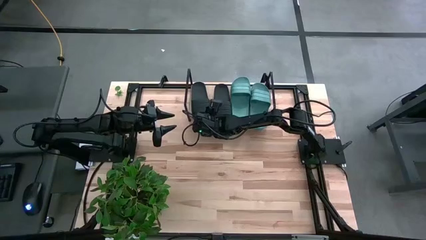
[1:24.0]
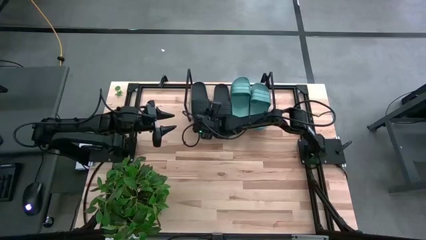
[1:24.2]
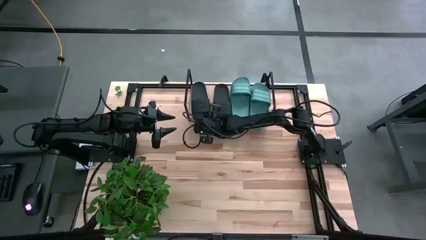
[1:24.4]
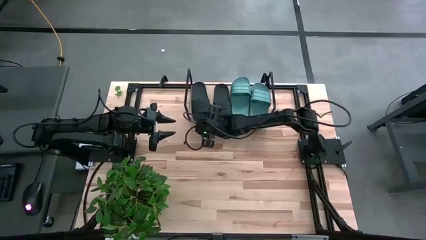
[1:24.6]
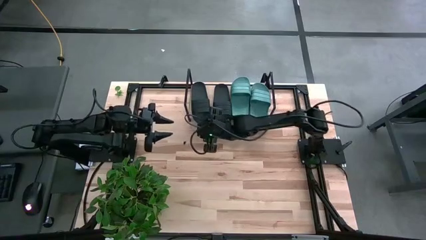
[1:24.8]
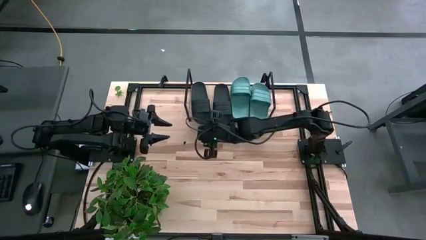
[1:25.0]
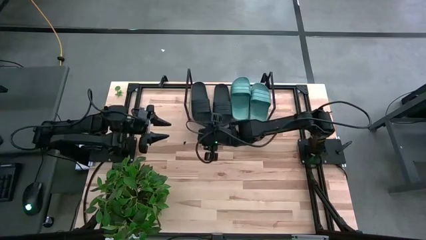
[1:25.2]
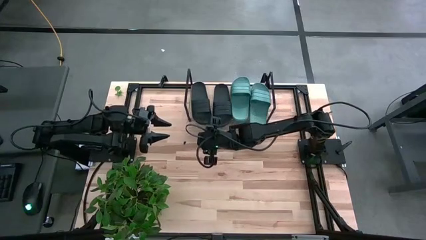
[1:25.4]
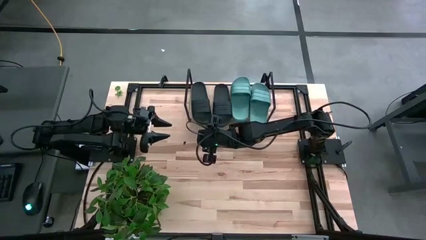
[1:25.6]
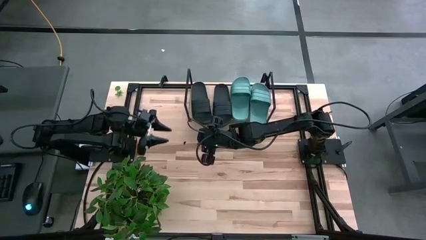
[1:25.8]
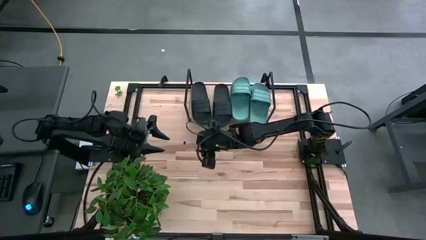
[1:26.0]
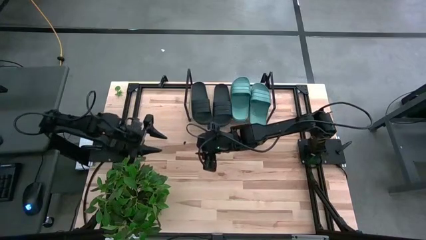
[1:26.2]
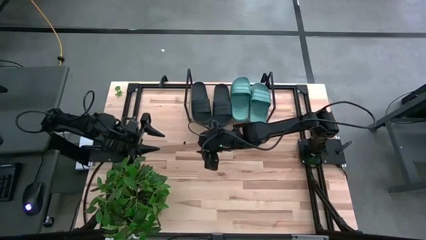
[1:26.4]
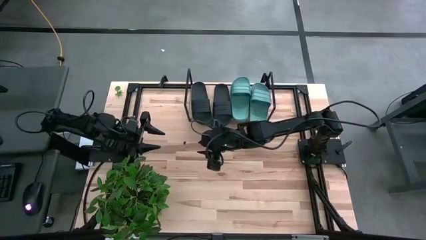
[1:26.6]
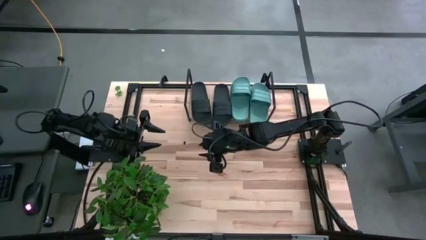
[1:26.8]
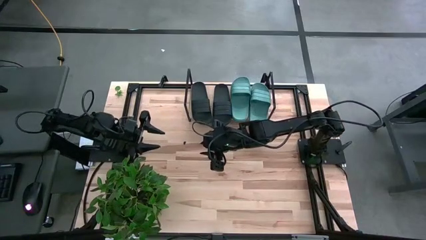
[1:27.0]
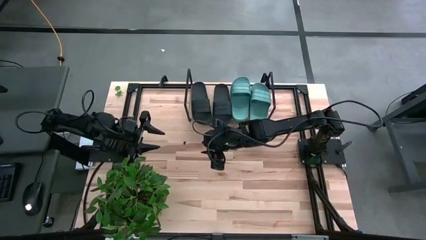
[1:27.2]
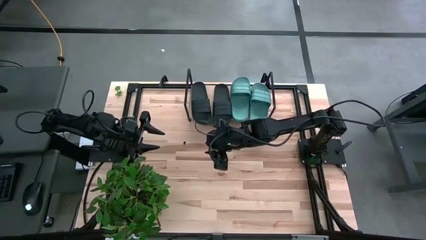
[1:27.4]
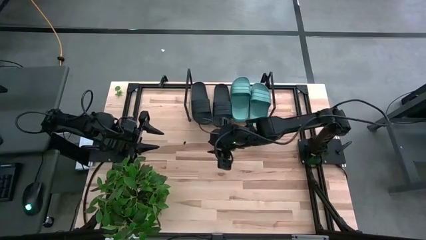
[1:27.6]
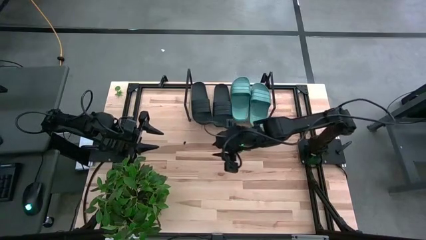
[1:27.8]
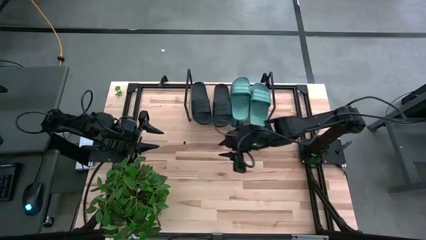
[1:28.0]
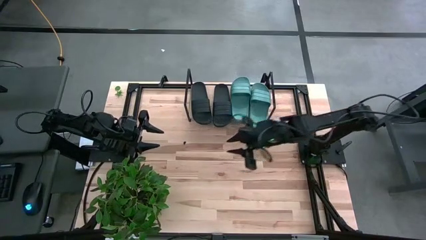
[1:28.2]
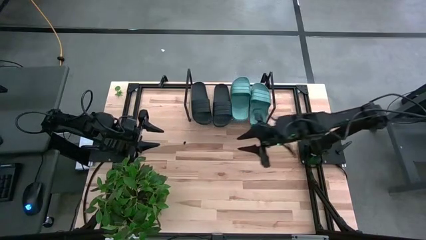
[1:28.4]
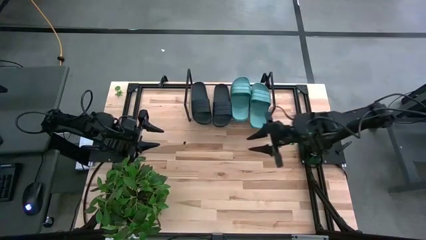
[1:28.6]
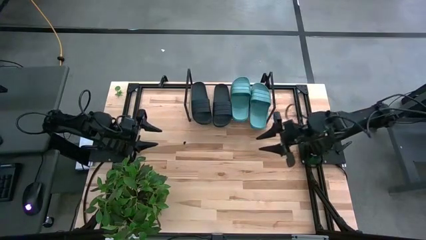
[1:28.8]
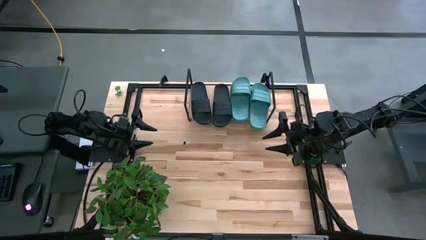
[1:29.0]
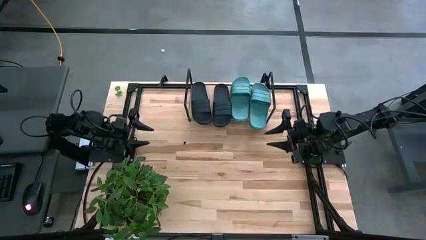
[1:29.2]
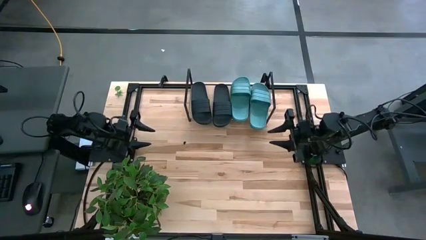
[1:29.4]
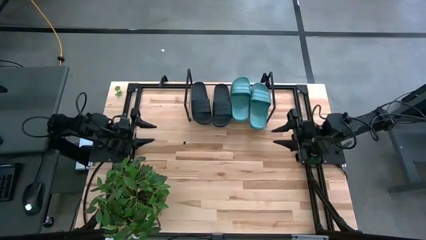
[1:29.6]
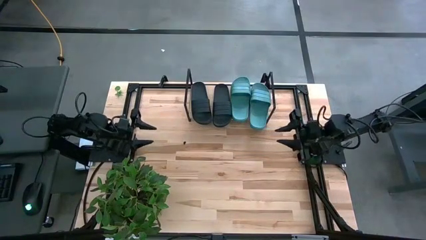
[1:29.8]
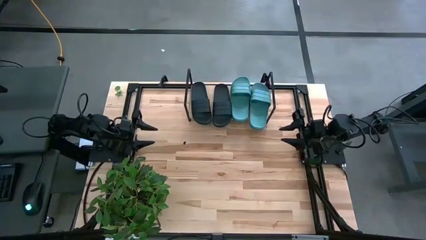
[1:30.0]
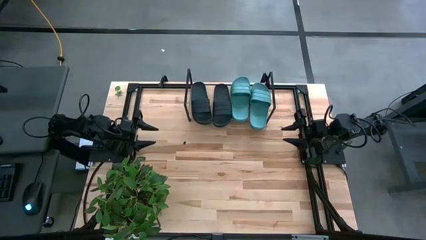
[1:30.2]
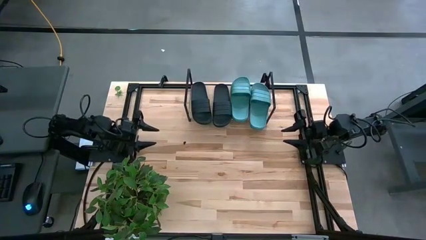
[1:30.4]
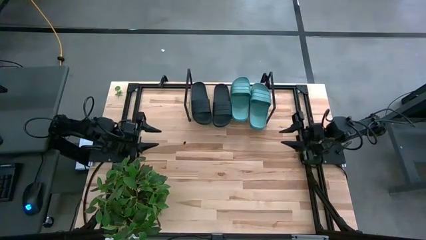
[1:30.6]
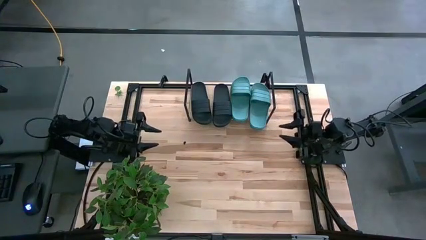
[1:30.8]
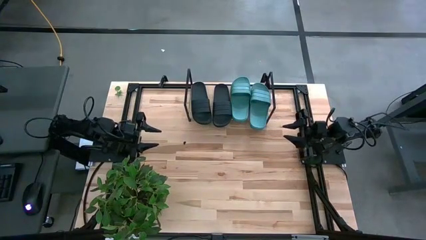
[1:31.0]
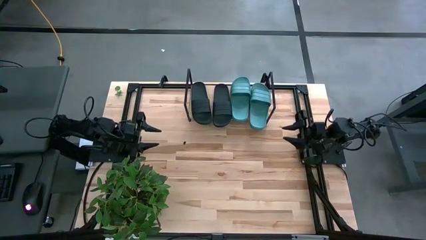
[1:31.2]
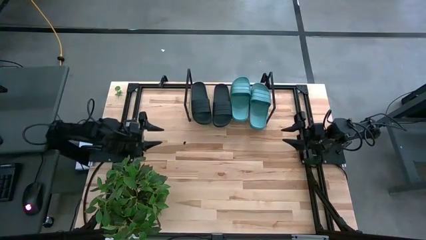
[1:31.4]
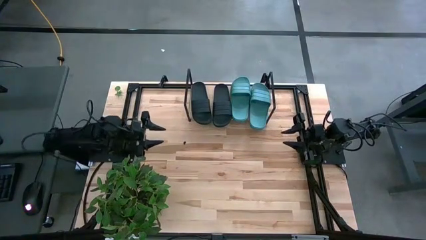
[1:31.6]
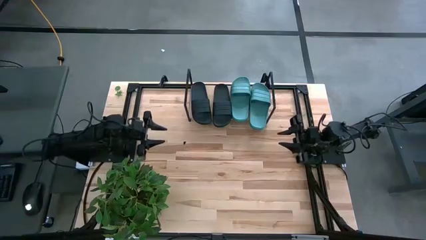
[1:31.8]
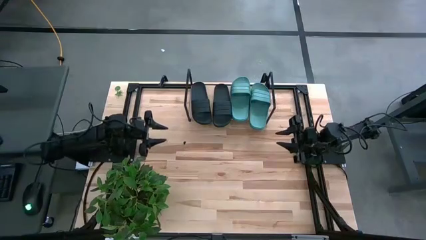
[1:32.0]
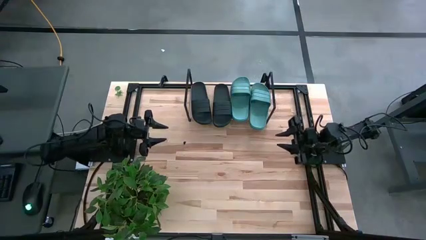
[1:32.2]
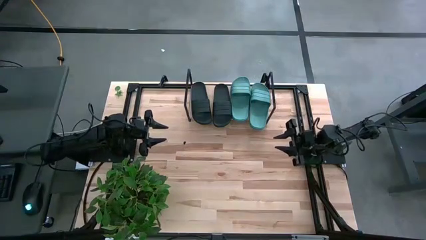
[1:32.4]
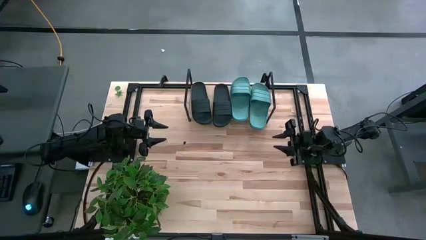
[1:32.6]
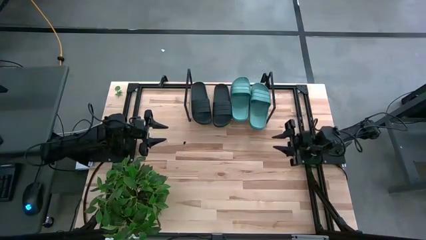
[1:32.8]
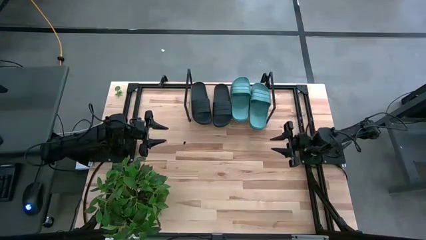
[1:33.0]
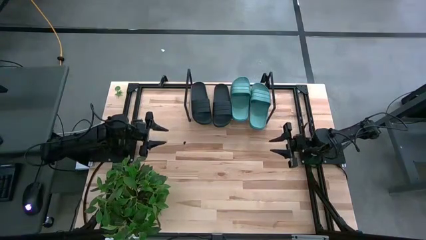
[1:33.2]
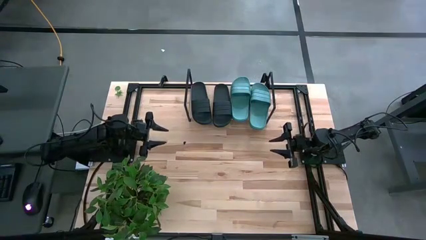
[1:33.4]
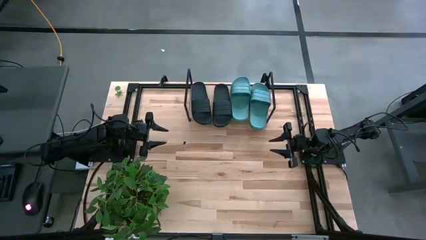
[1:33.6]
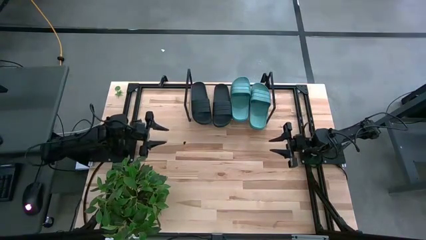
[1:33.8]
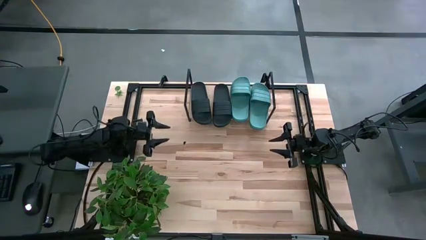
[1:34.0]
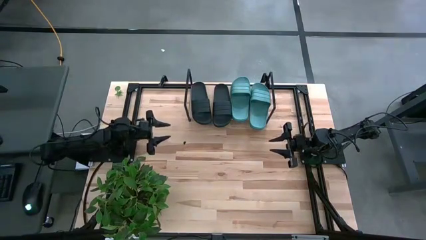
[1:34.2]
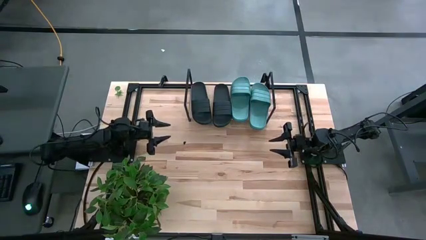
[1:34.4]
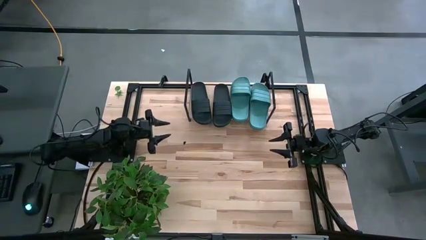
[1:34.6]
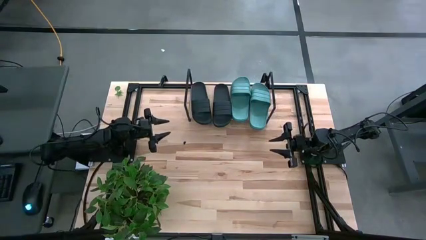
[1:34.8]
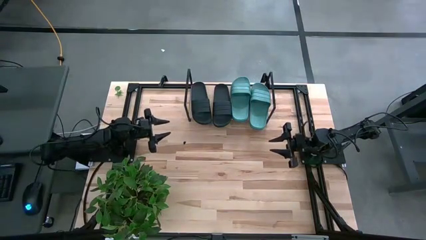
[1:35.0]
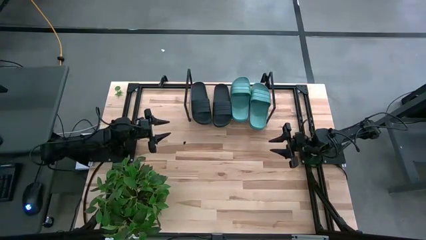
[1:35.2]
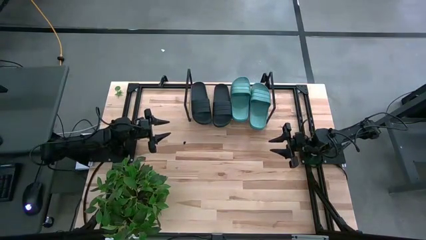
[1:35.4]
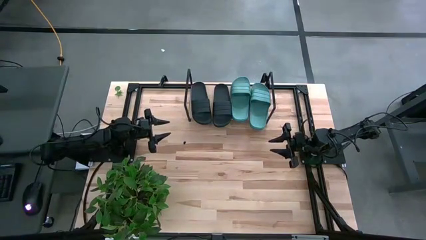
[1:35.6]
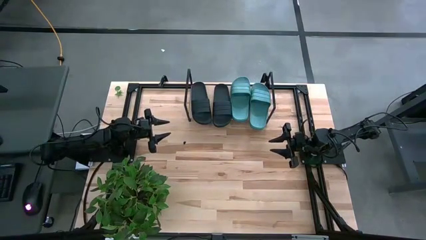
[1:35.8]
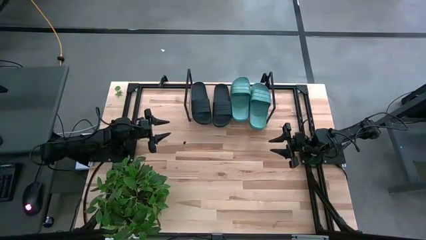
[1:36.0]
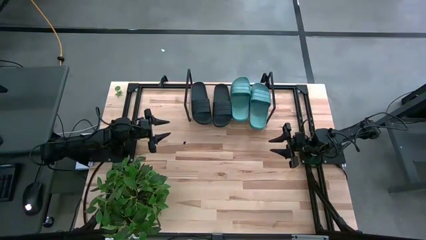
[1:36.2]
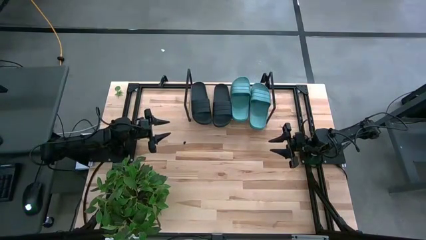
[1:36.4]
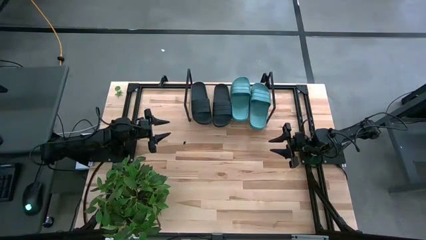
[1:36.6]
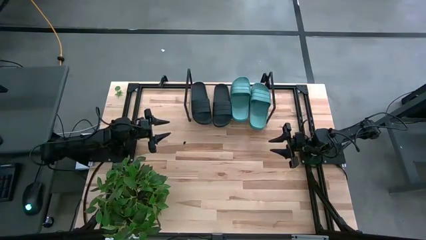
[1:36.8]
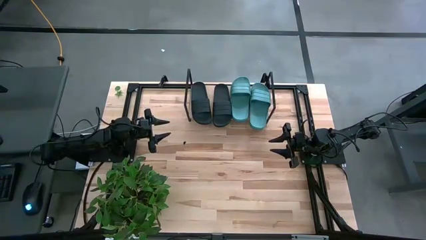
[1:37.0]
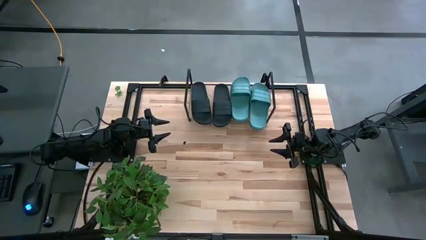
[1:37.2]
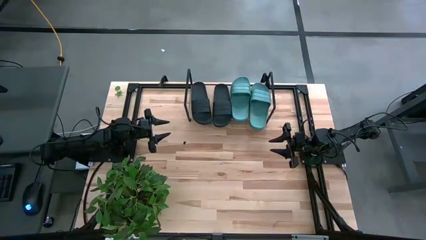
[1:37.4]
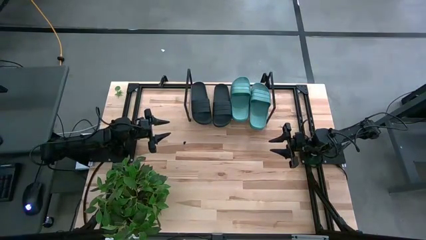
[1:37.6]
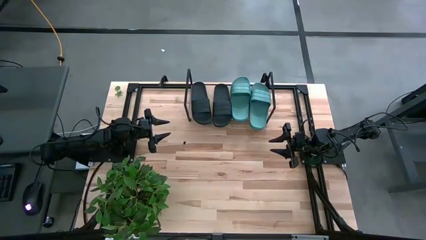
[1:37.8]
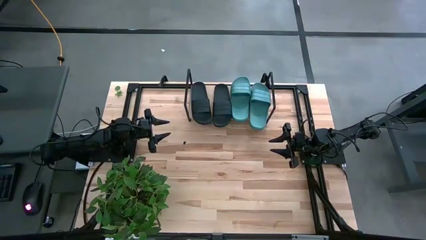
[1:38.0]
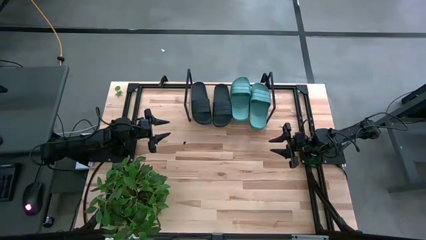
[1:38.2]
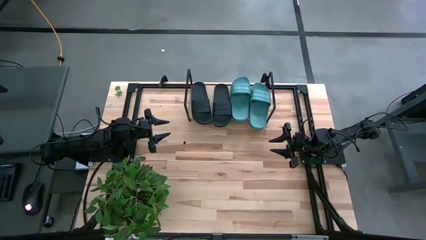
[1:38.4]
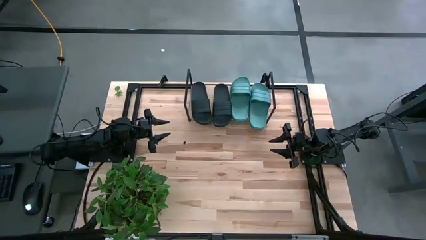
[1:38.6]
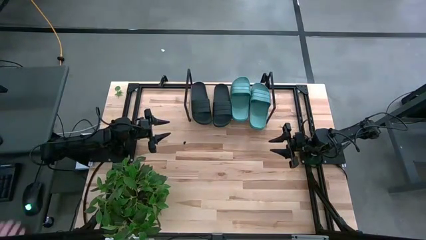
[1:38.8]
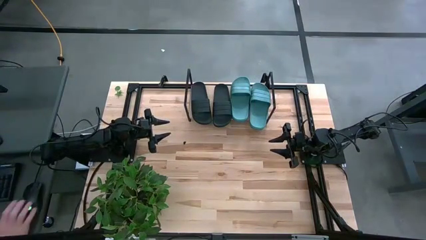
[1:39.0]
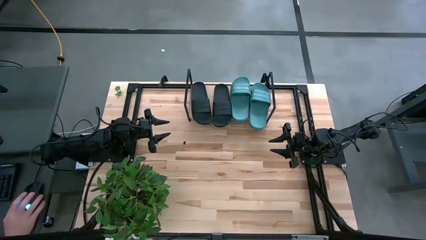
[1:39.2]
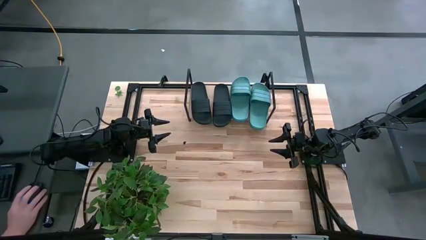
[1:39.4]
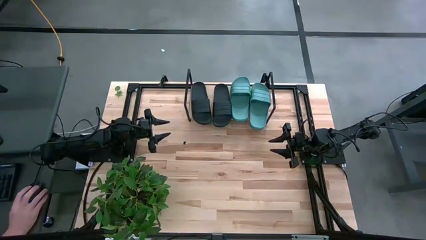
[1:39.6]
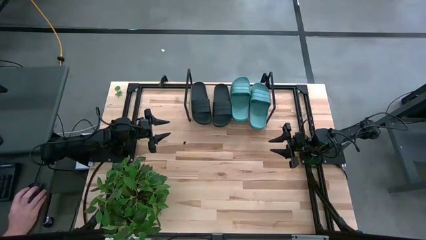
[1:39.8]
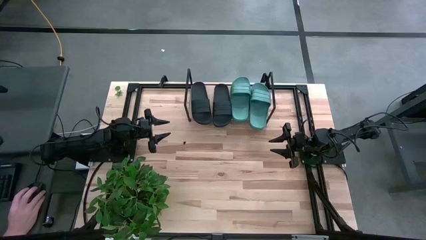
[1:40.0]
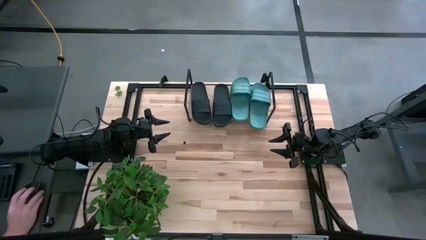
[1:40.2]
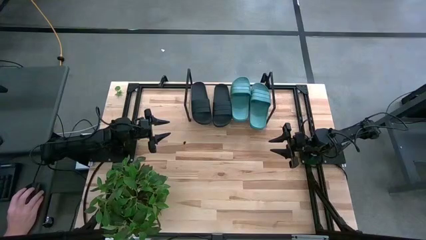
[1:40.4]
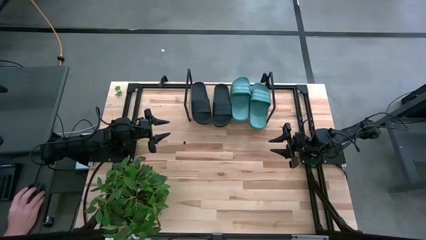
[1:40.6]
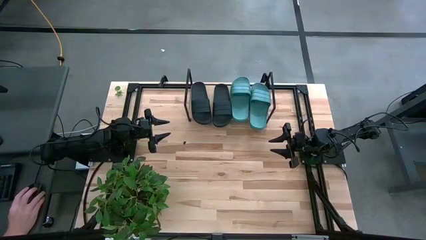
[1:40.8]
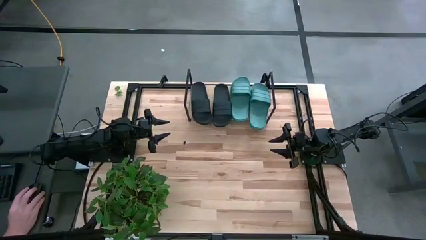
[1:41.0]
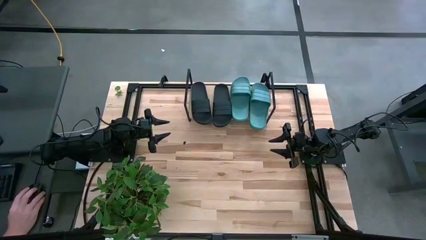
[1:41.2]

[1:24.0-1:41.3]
Task: Pick and place slides into the shelf
Return to Home Position
